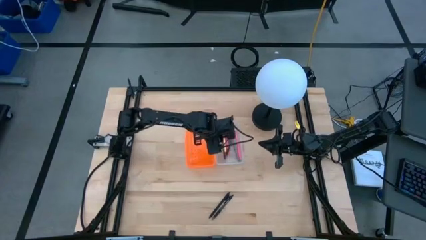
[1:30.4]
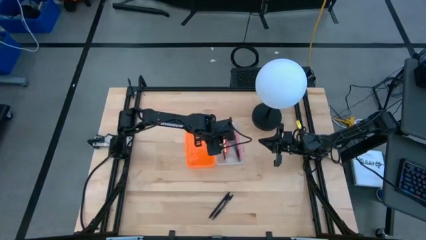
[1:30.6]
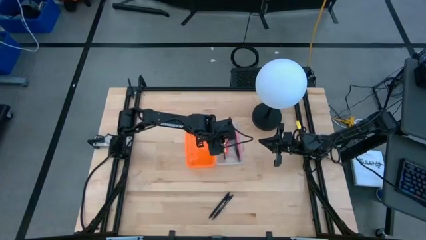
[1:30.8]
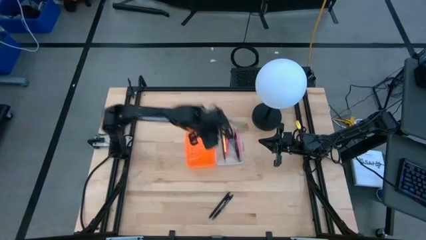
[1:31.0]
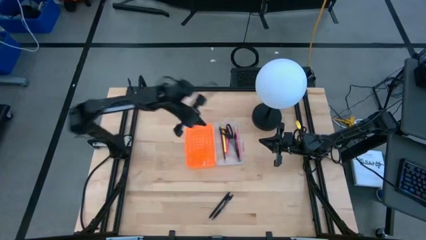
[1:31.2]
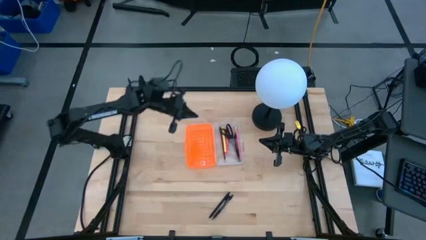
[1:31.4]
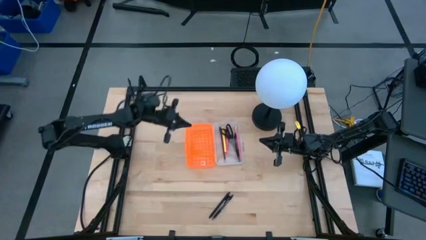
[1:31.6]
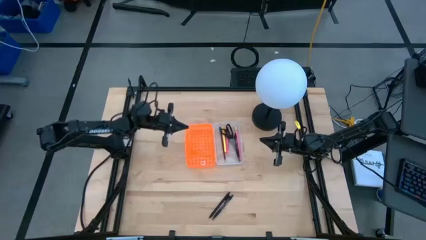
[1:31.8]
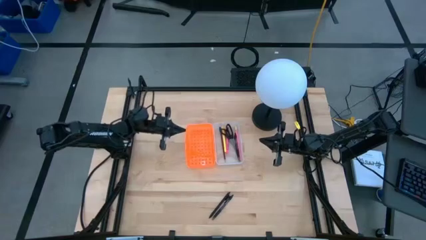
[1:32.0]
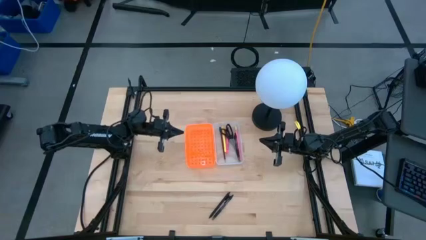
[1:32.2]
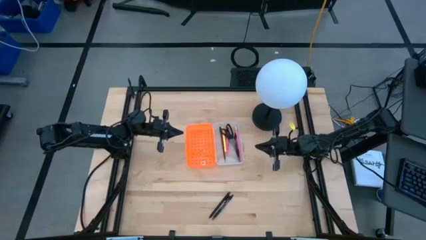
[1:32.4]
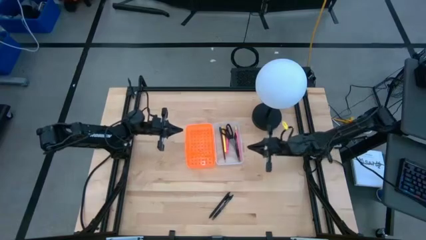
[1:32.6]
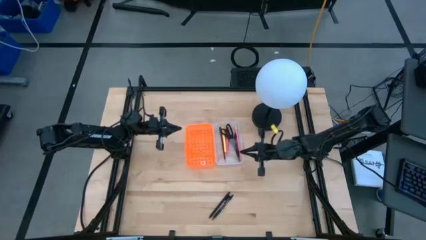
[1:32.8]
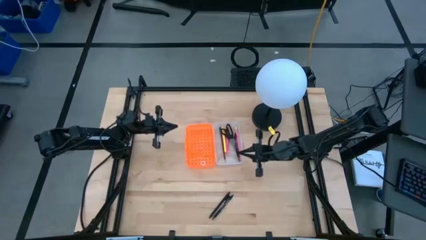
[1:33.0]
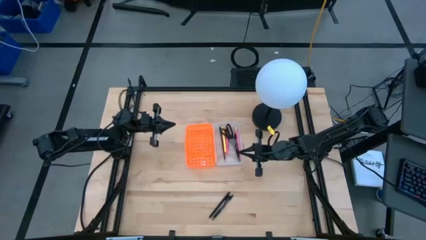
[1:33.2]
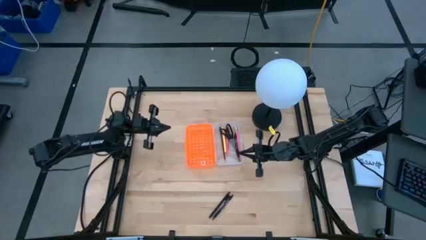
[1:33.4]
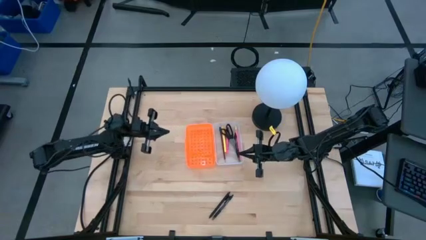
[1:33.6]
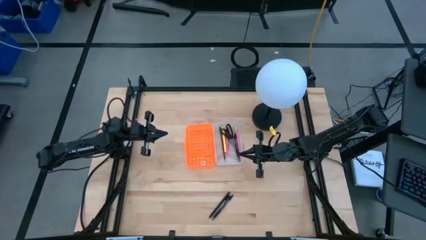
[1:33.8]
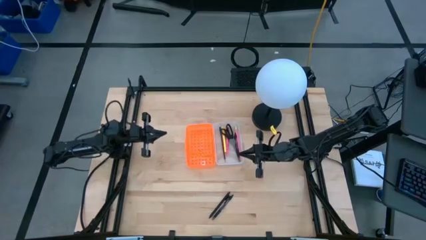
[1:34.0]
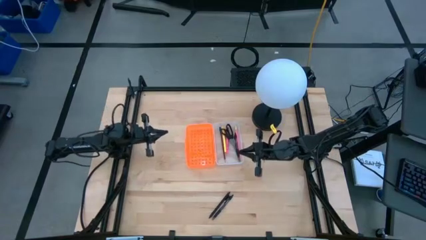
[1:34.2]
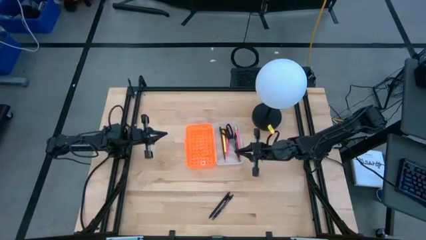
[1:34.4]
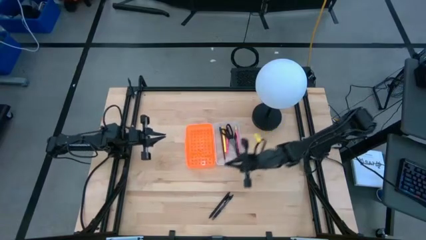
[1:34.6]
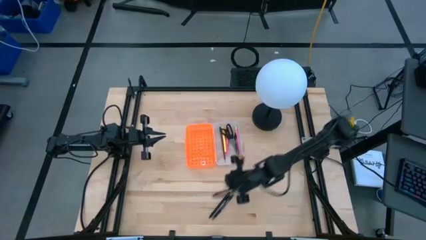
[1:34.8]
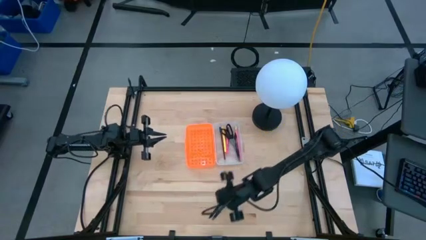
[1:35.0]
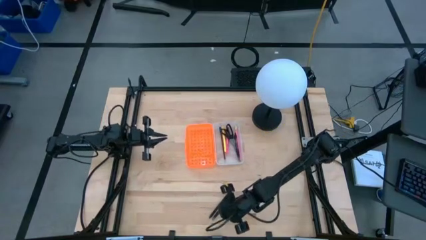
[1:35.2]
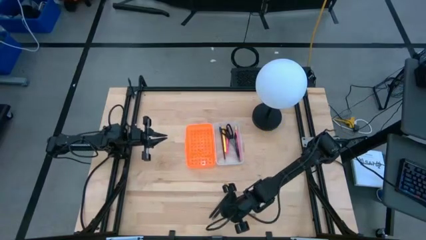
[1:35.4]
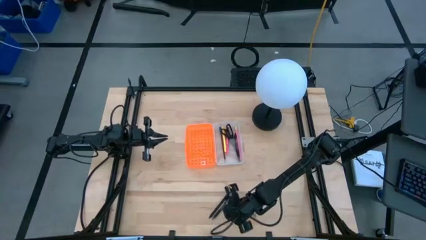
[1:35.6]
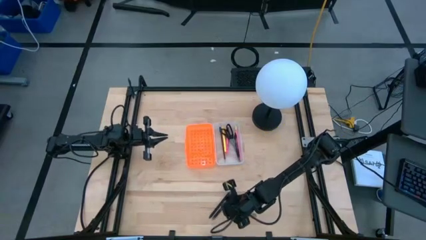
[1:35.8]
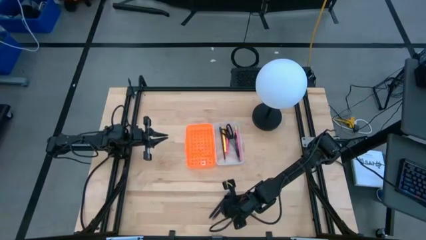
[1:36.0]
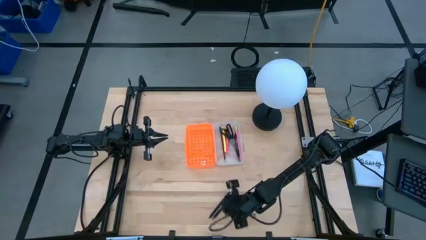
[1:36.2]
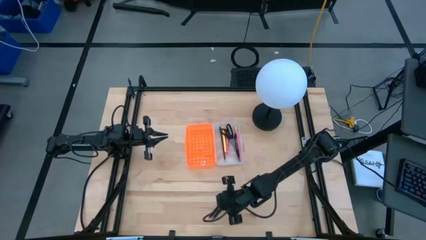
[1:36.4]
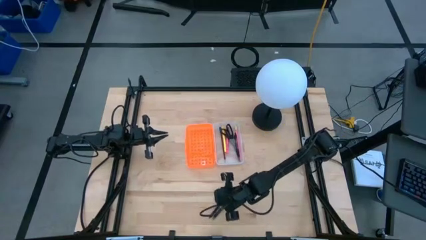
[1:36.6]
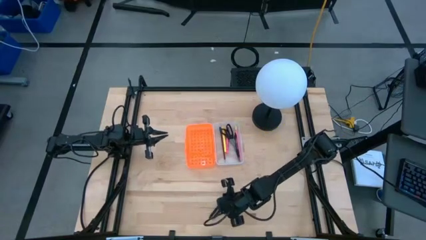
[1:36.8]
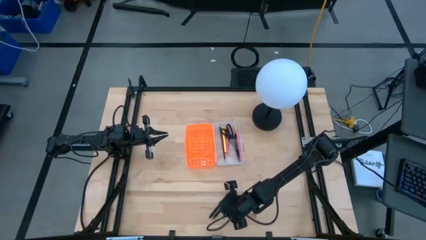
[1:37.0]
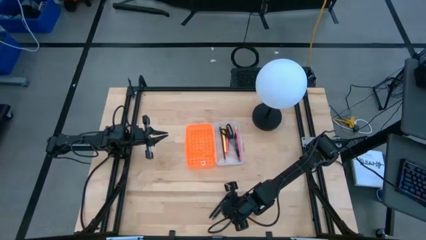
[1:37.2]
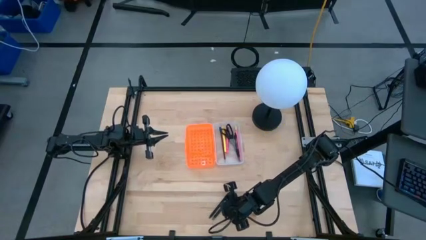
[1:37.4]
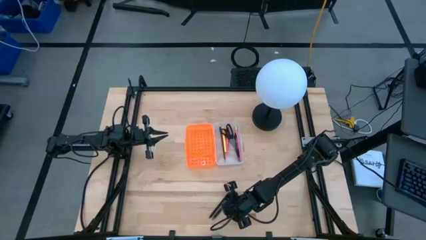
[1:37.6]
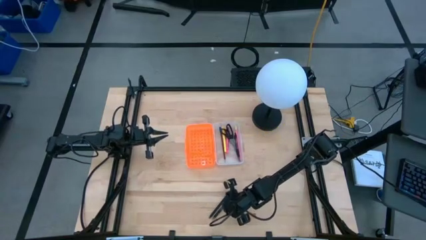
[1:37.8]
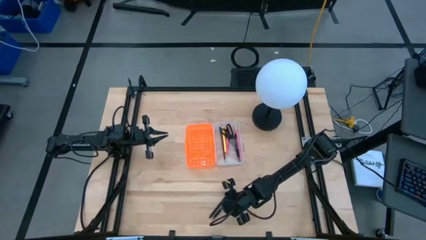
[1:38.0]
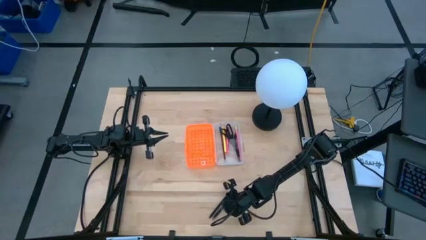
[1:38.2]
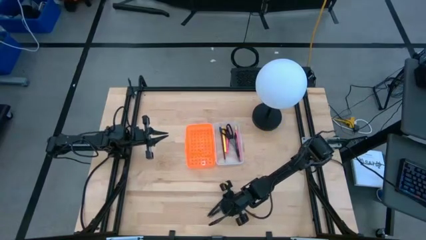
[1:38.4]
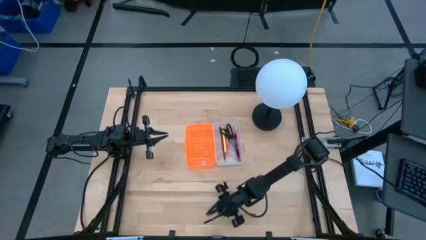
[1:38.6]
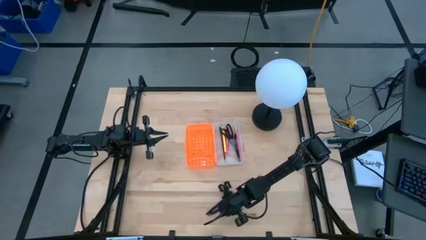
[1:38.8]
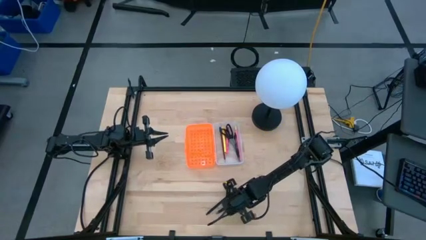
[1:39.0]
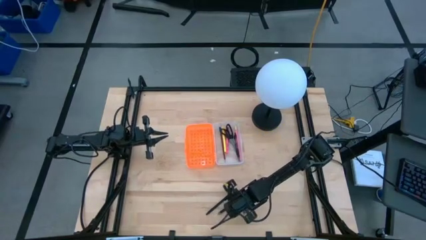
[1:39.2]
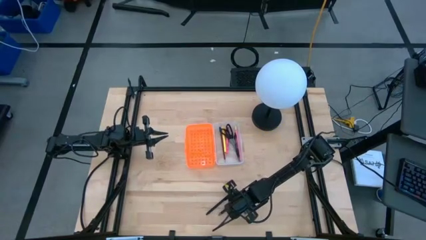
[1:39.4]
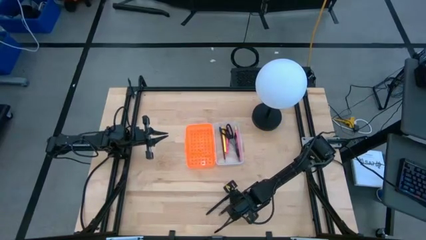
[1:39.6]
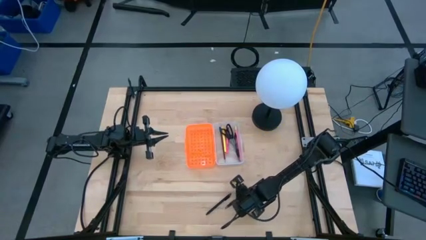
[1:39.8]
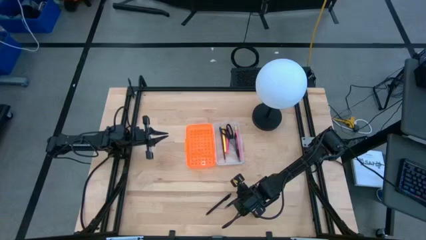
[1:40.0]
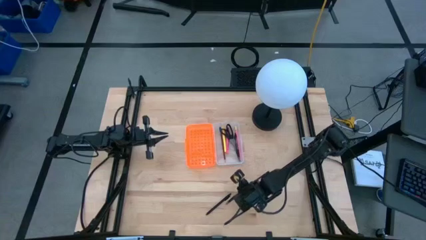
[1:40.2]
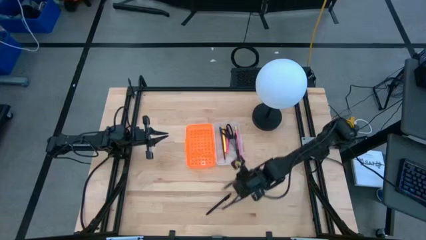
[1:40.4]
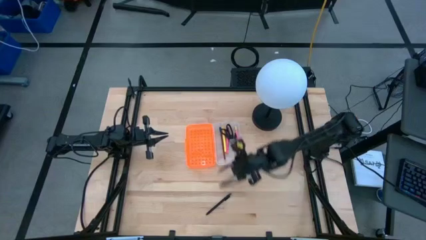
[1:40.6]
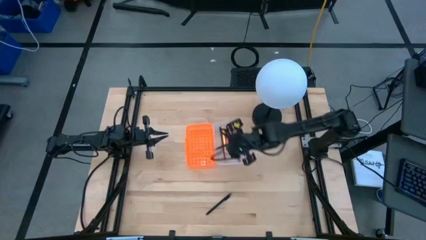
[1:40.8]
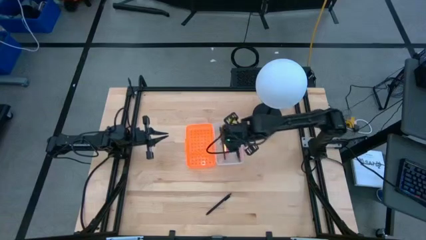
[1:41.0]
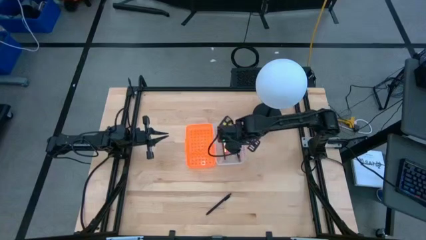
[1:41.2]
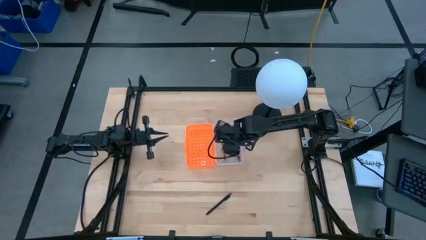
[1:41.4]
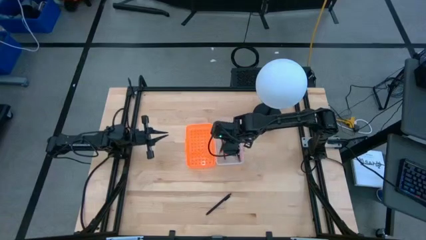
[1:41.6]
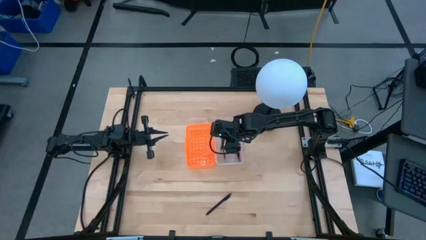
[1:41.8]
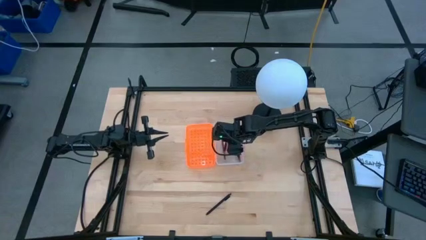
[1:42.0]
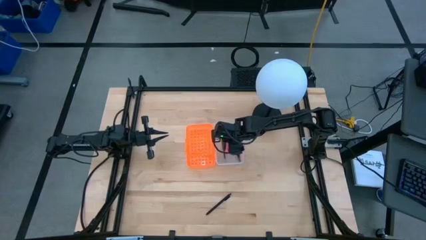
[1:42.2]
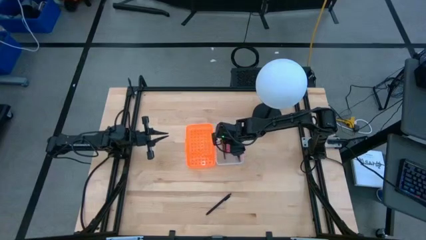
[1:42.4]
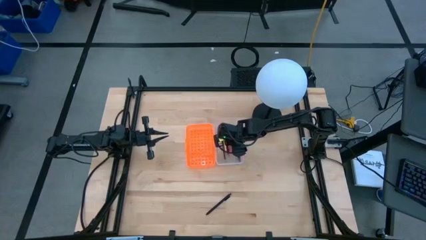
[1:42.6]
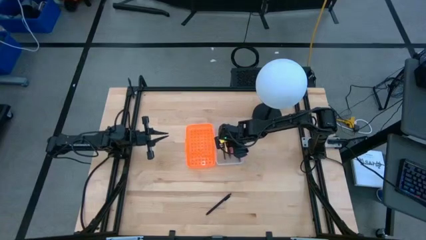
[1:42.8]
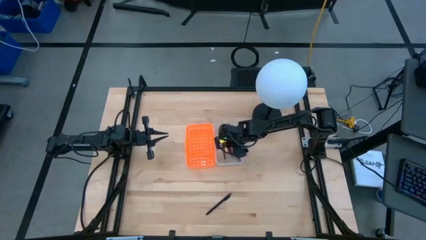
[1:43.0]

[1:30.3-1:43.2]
Task: Pick & place school supplies into a supply box
Put the right black pen into the orange supply box

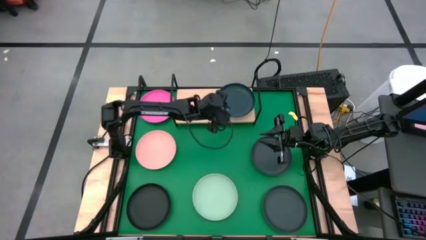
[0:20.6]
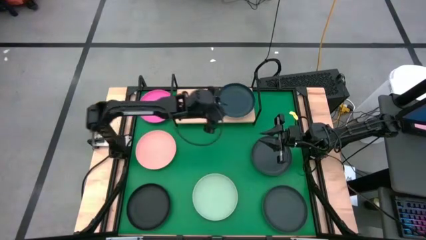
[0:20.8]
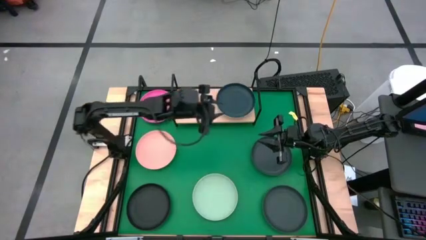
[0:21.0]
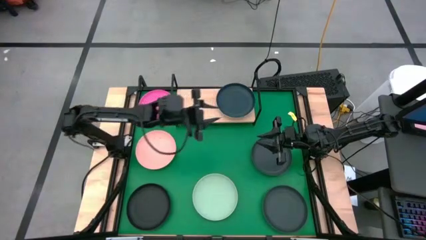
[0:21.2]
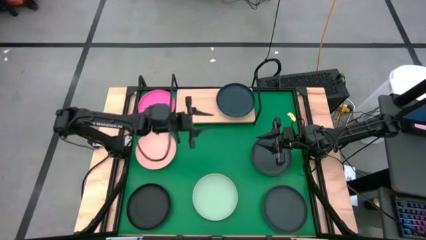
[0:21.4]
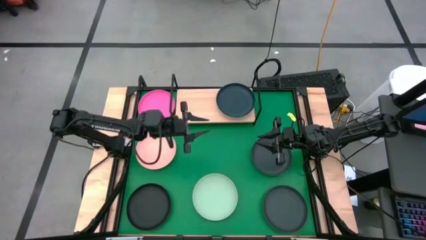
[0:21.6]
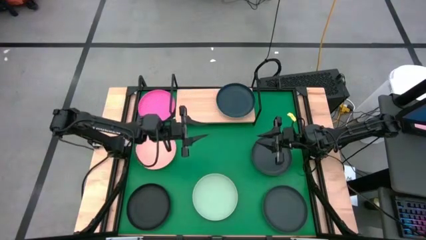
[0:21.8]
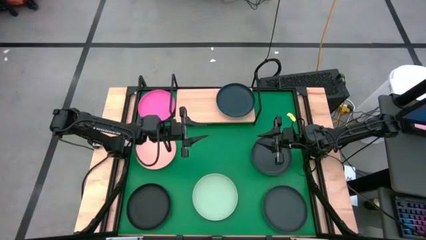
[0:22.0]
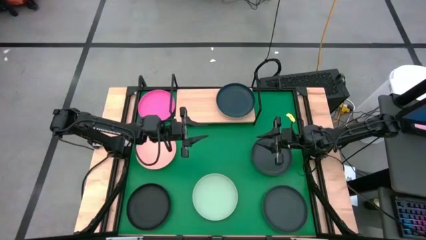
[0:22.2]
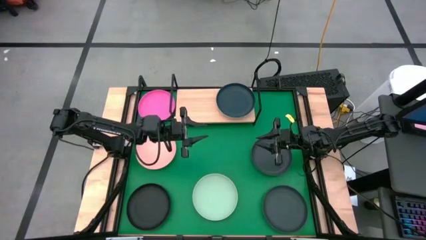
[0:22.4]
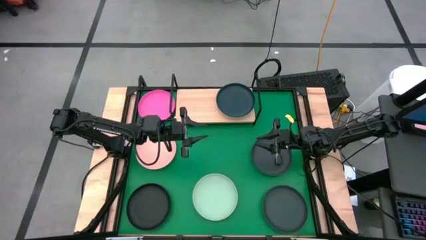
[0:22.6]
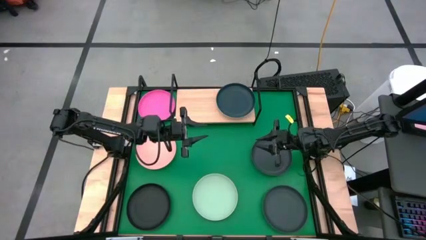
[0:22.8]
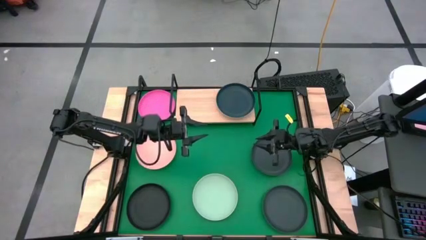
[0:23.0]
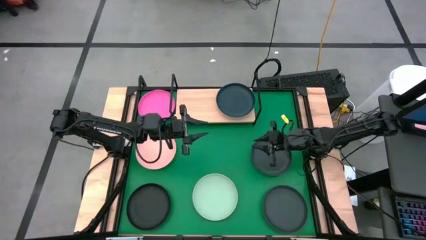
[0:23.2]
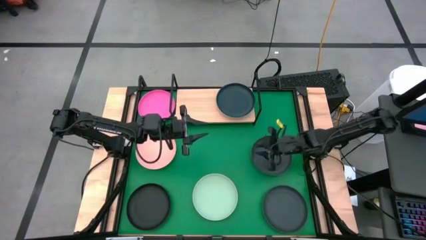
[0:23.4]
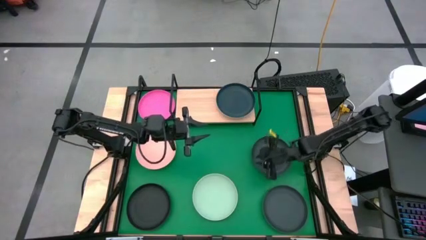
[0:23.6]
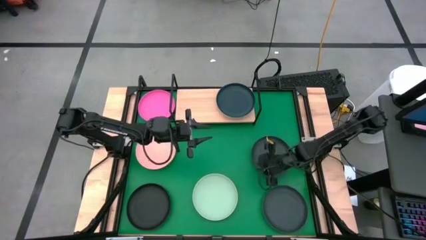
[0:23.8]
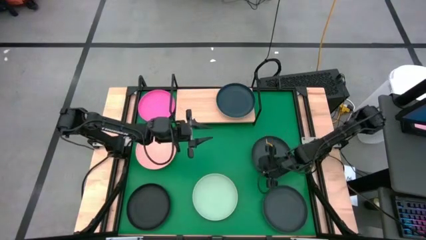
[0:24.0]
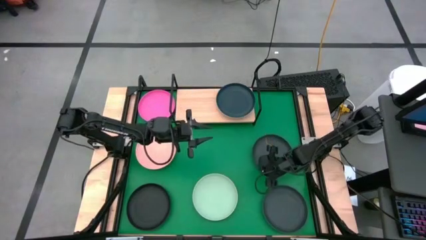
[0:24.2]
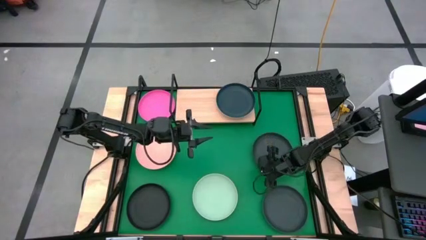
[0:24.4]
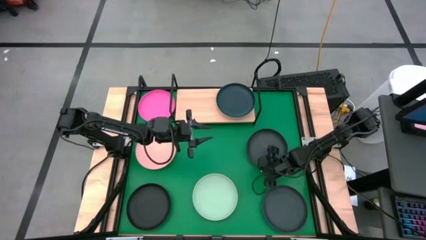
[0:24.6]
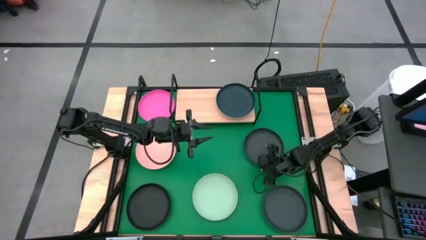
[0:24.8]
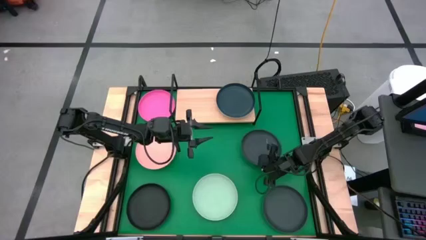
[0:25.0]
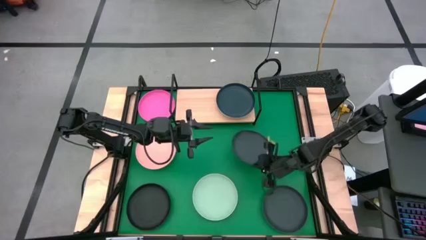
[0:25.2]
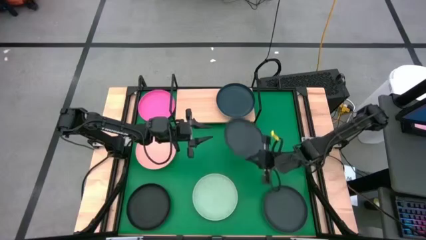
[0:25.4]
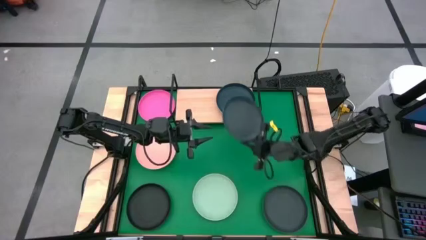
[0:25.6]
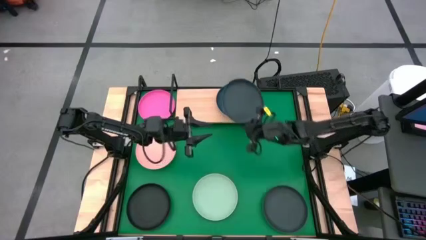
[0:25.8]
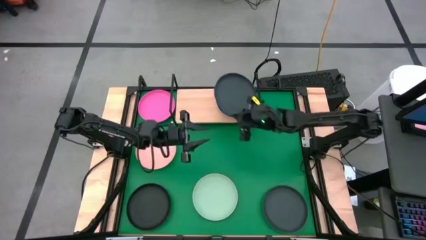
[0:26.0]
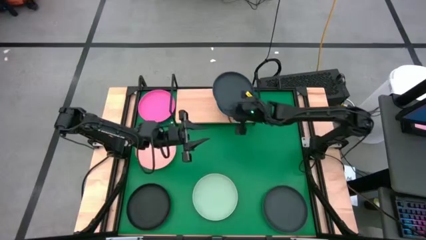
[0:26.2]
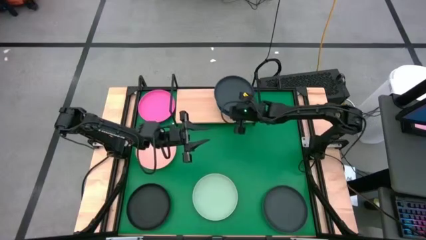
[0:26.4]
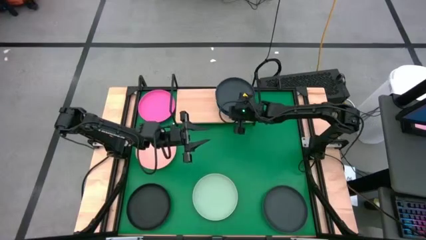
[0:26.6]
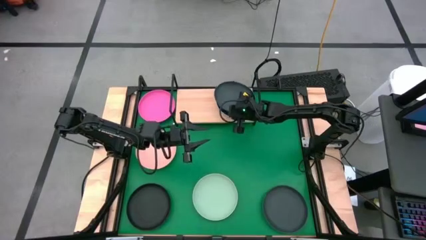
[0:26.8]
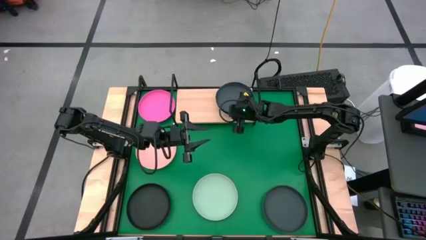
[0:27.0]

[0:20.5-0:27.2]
Task: Place and stack plates onto a shelf
Stack the top right black plate on top of the dark blue plate on the shelf
